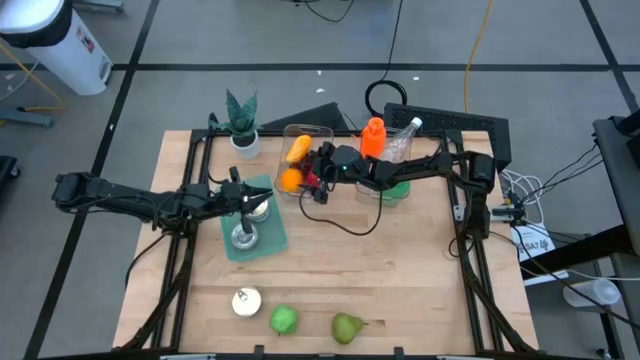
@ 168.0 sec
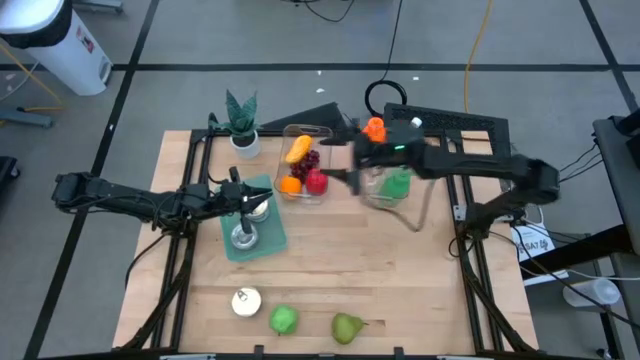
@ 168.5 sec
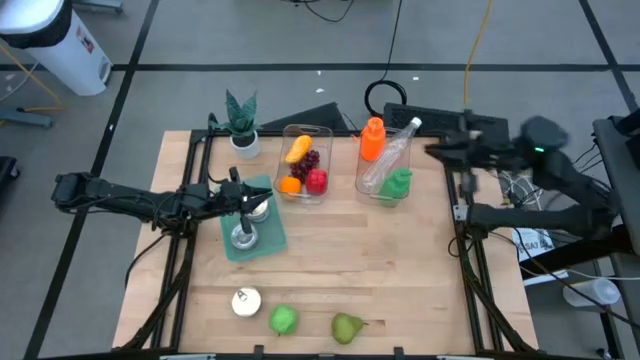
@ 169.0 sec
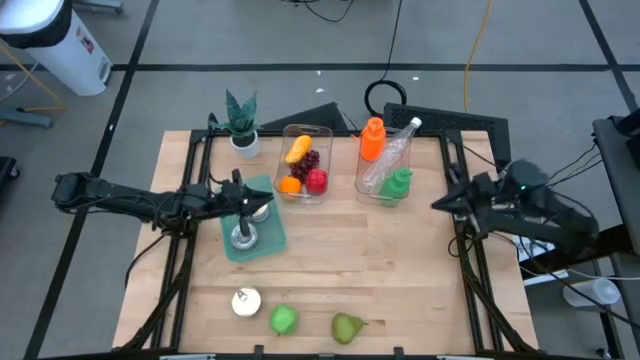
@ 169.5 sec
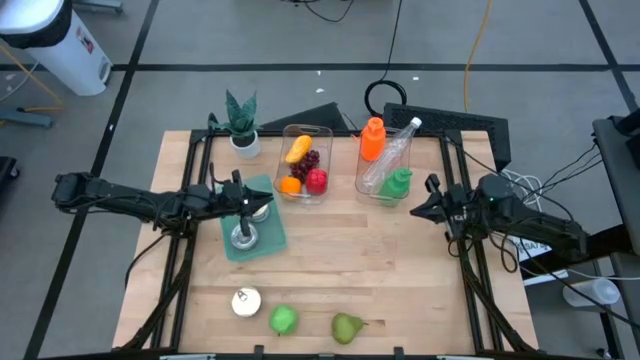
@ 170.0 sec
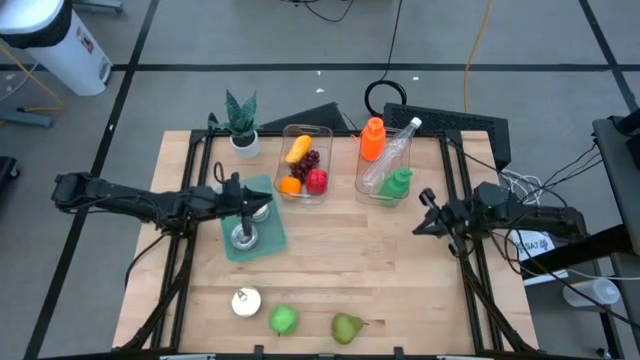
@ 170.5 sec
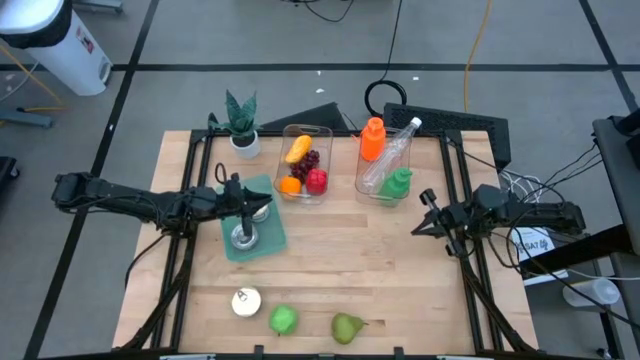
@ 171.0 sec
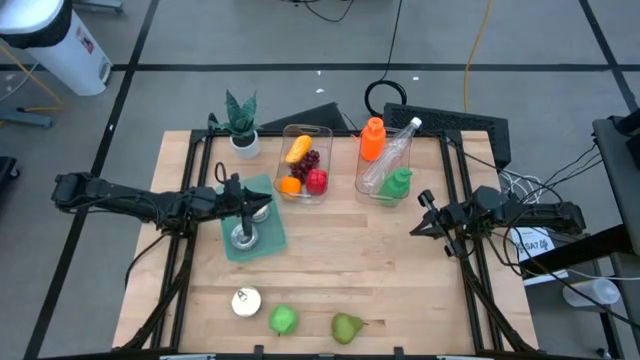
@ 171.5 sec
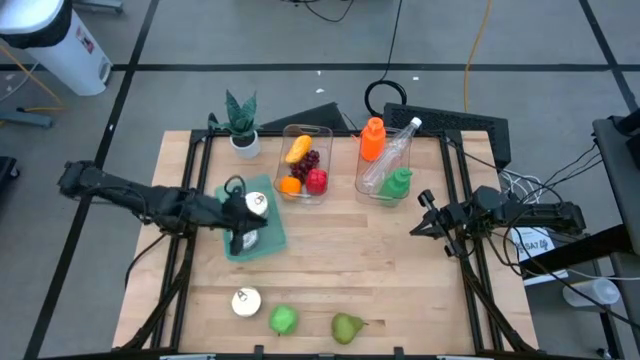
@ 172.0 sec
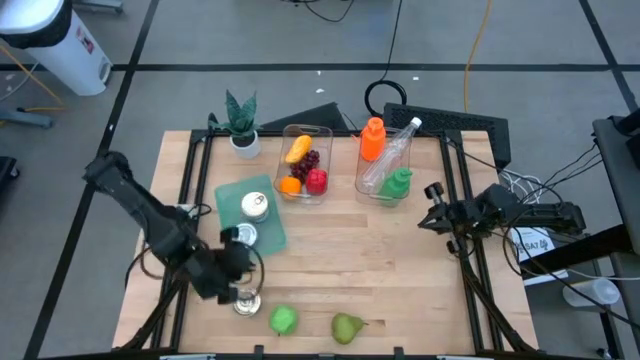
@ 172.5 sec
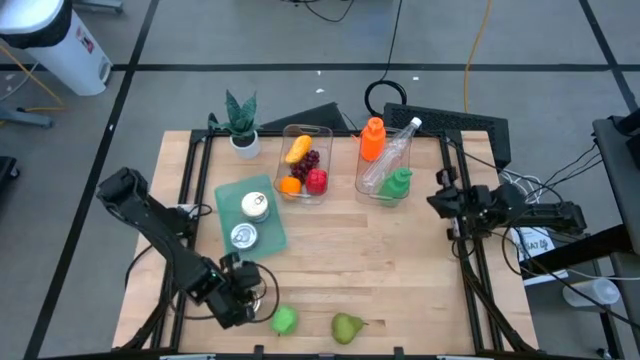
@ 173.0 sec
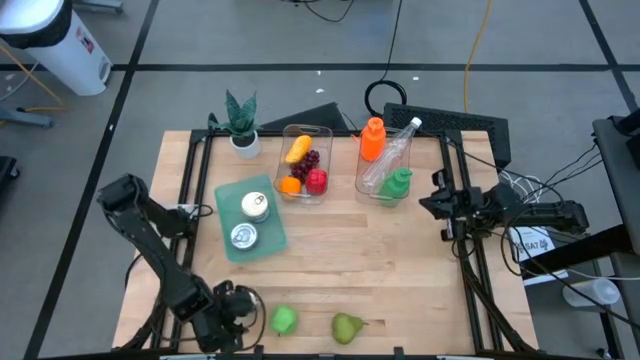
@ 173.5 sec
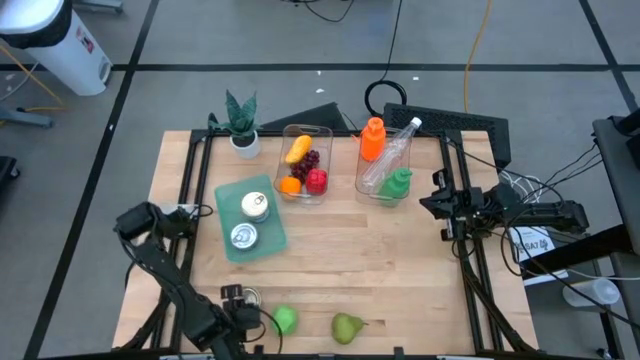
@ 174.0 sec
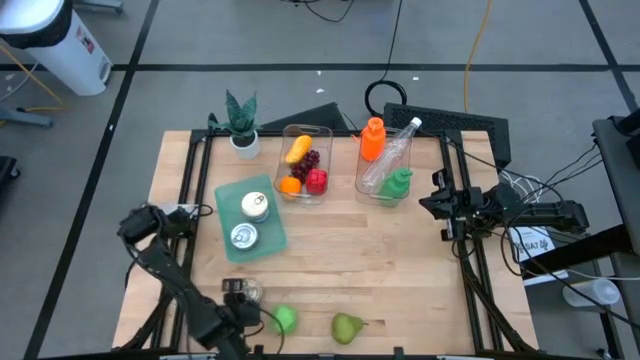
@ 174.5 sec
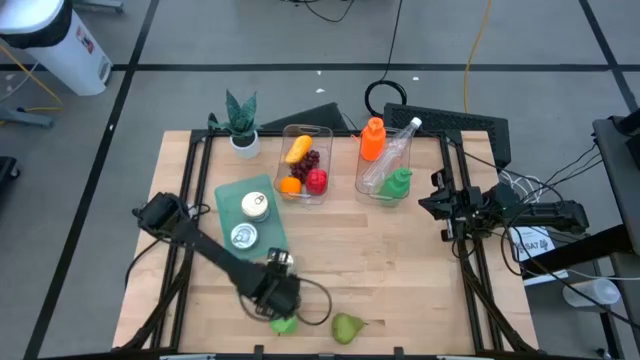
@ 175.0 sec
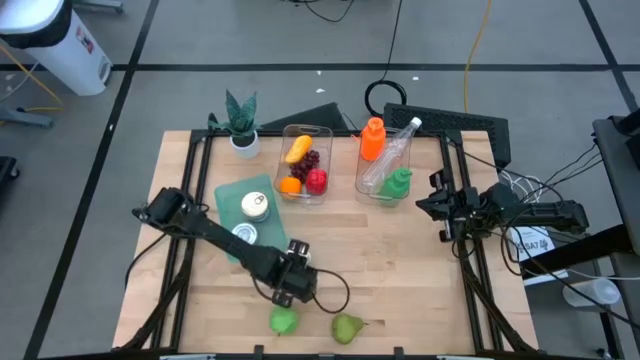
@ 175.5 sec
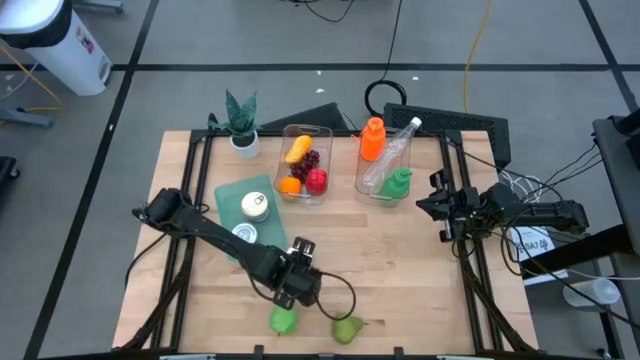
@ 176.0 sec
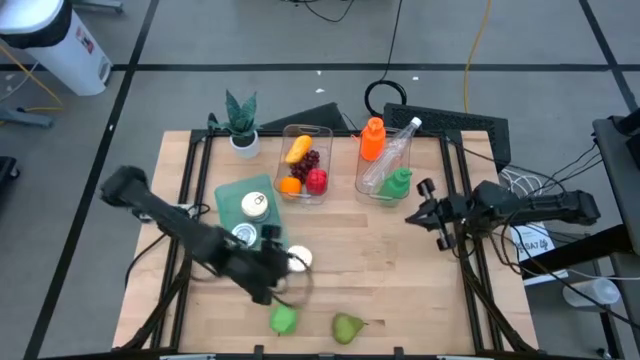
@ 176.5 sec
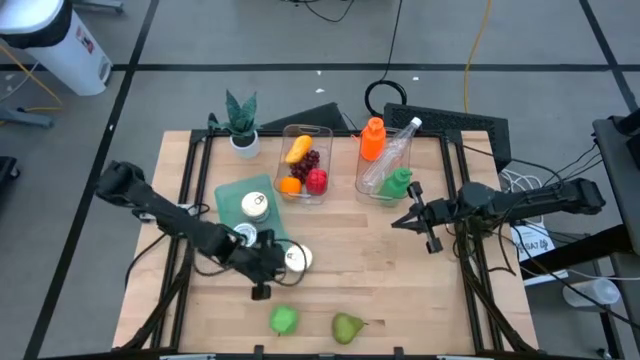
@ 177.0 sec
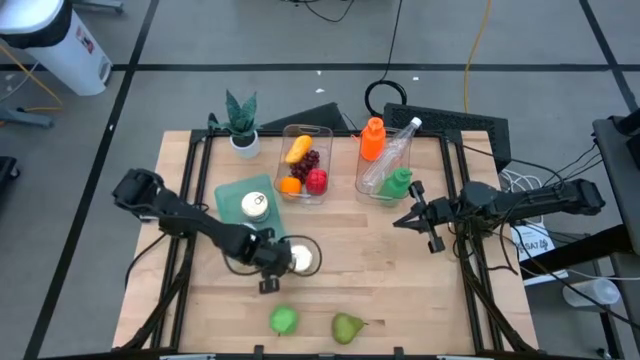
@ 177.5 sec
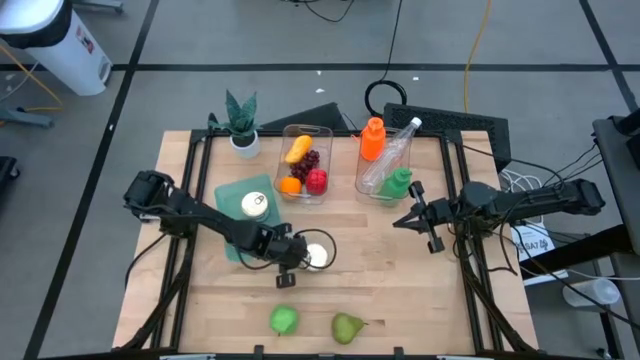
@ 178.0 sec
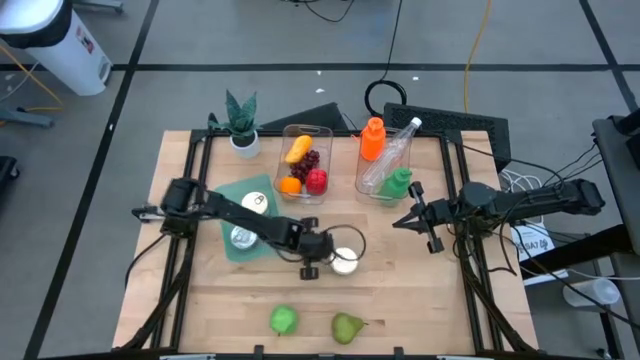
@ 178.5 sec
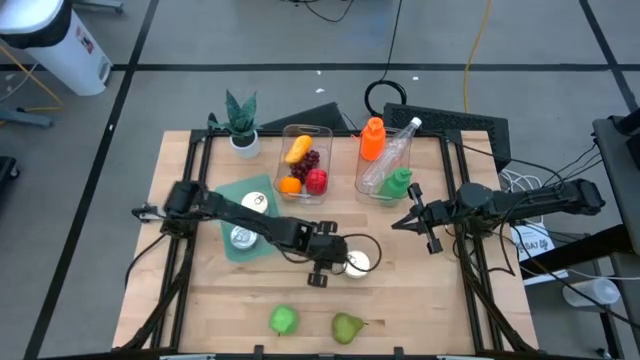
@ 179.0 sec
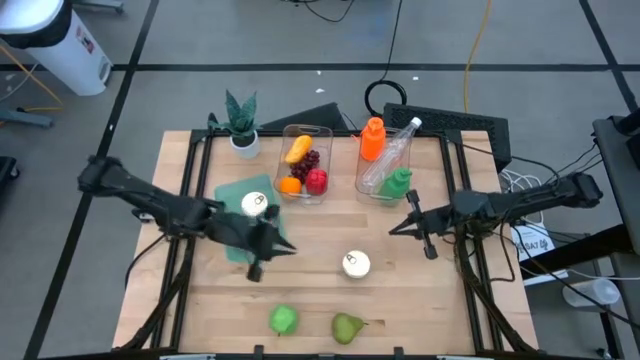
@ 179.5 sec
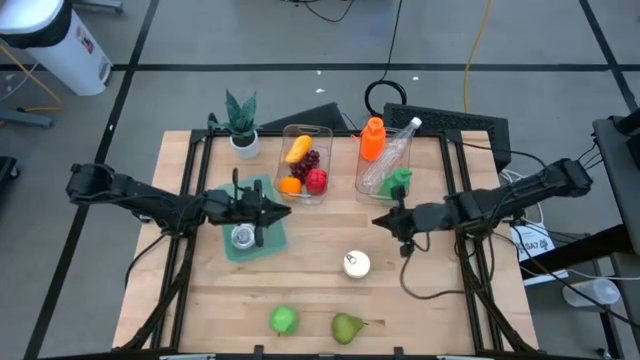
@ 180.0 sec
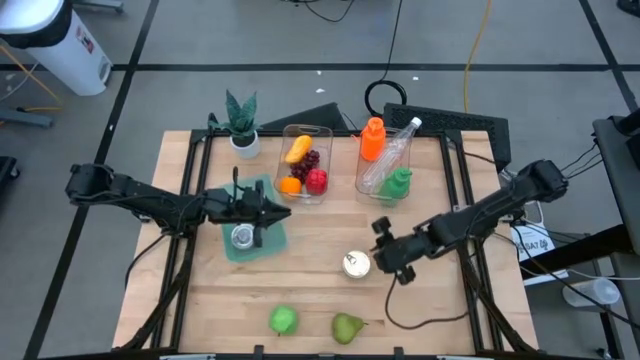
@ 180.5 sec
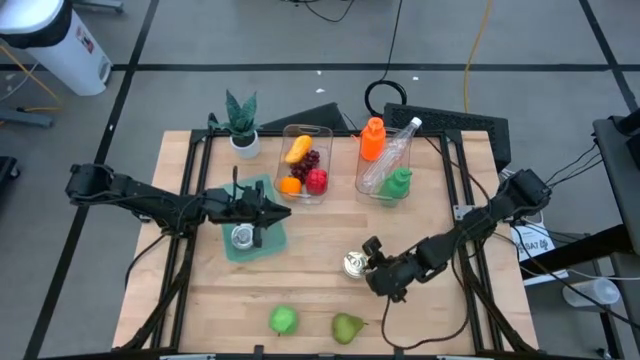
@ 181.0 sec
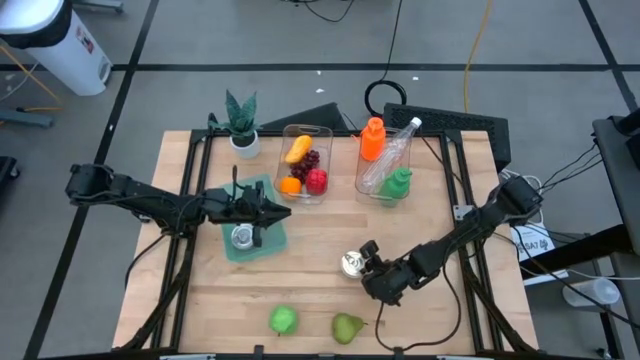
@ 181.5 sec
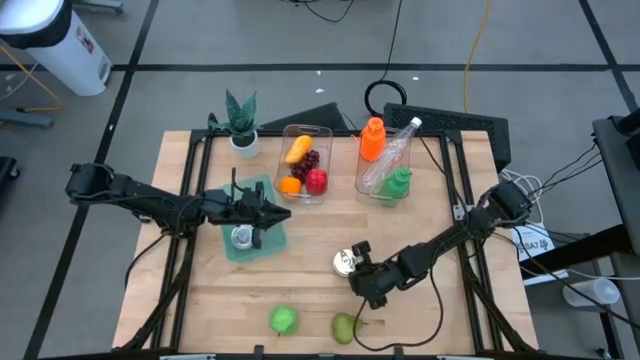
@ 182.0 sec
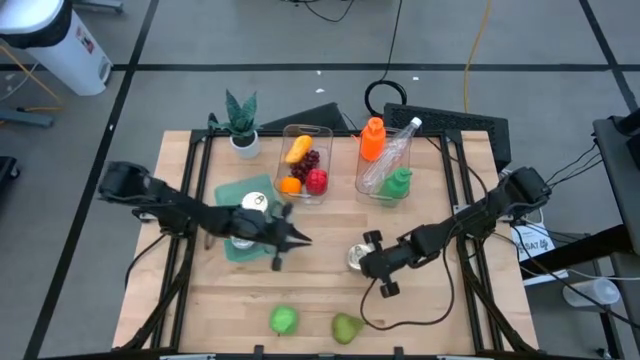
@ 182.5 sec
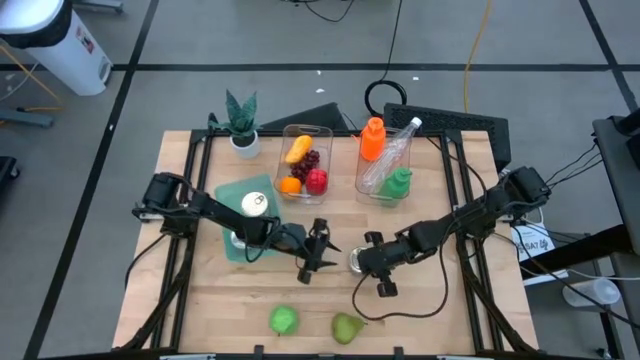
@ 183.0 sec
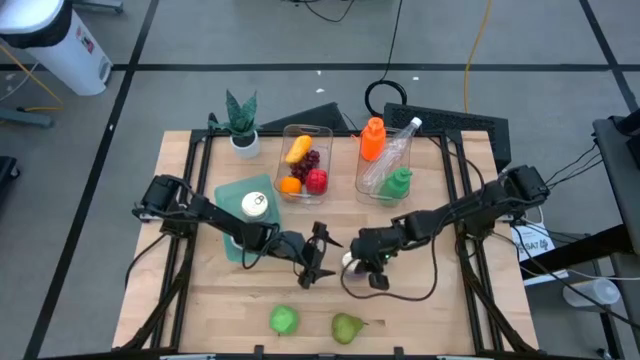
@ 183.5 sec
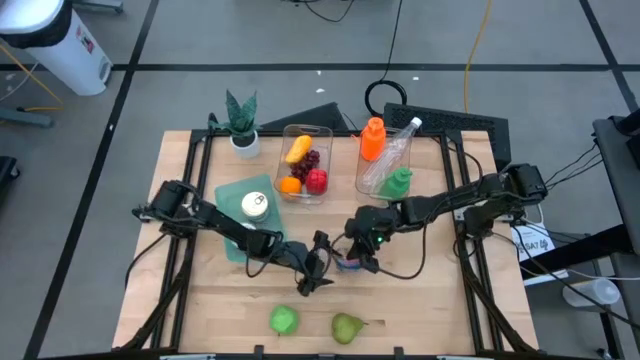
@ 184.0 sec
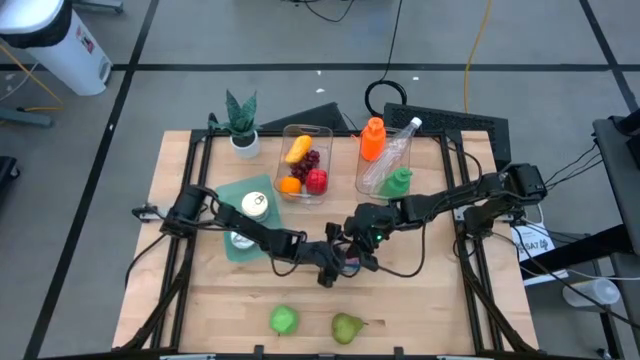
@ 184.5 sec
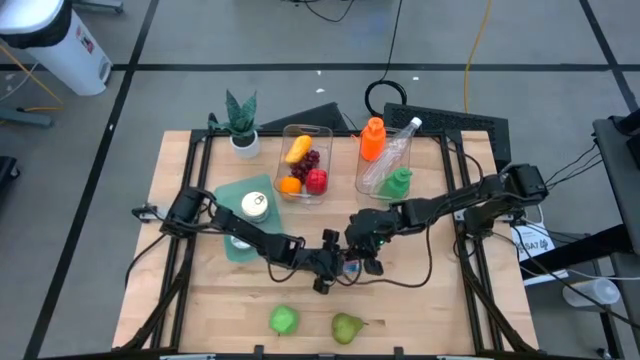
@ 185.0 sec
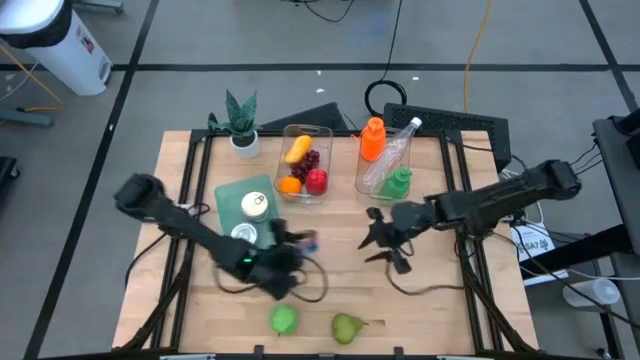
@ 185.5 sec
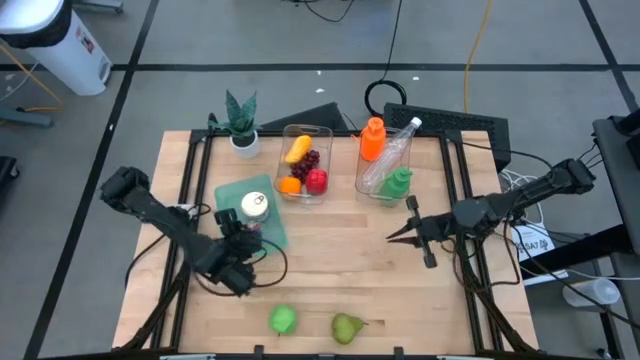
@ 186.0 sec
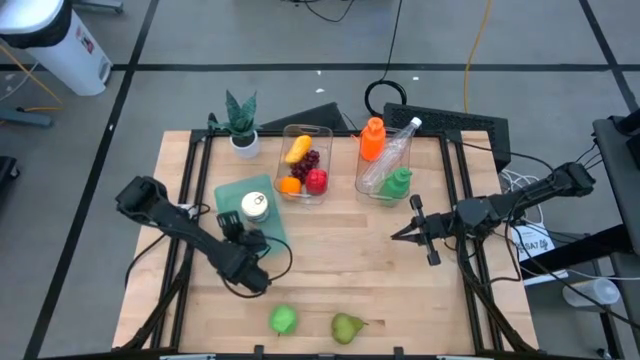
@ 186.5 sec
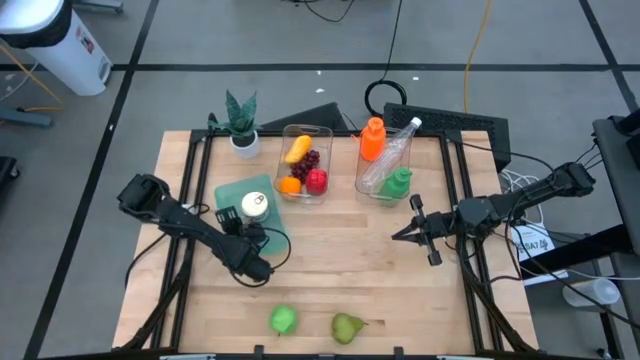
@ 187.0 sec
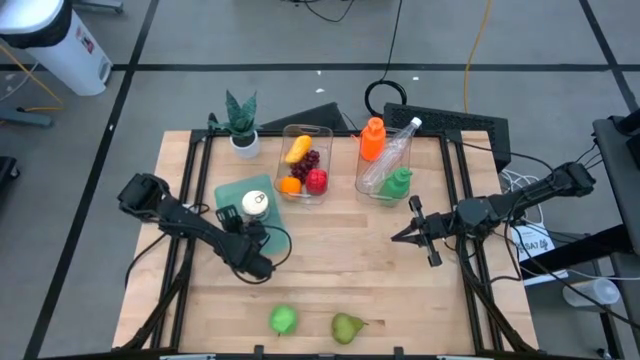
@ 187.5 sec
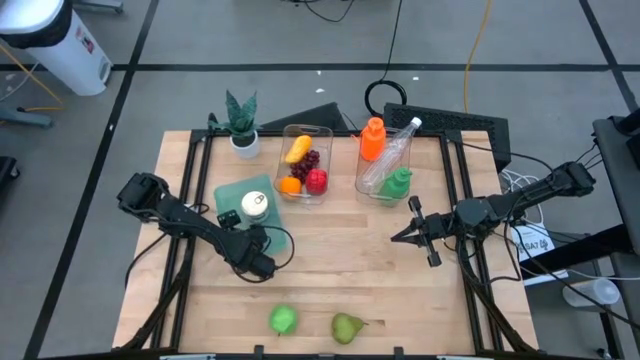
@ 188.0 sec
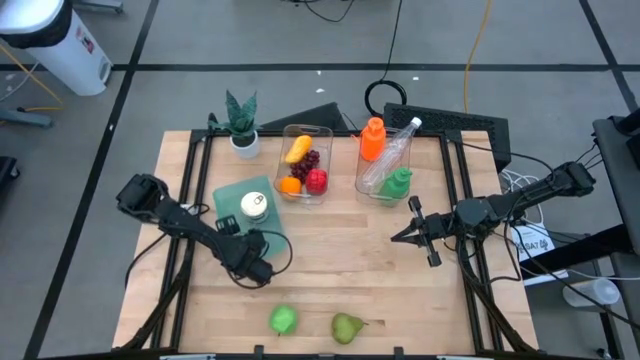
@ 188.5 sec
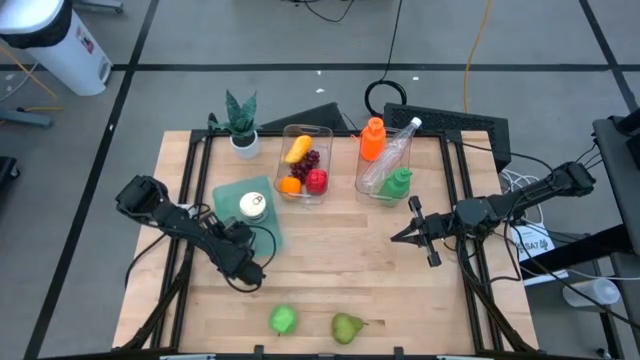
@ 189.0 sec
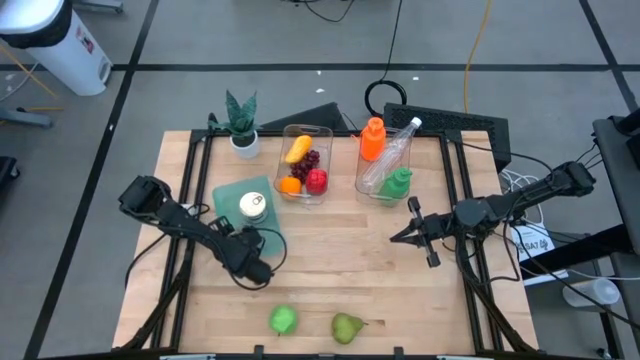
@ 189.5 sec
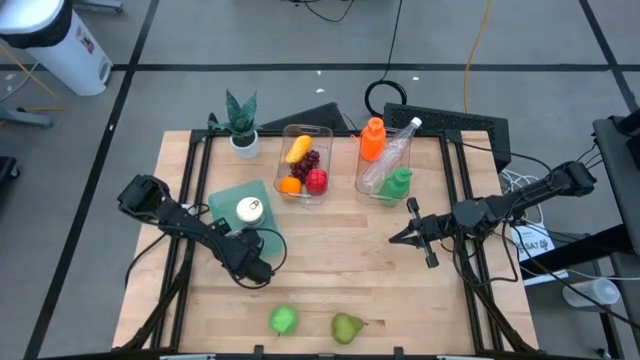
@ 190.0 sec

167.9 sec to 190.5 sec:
Task: Pick & Place Food Item
Put the blue and pink tuna can into the blue bin
